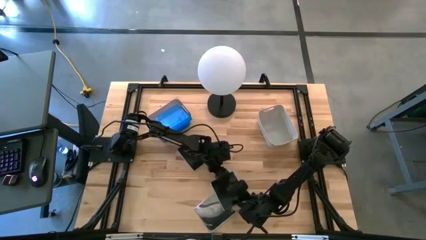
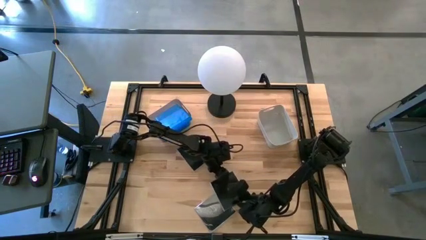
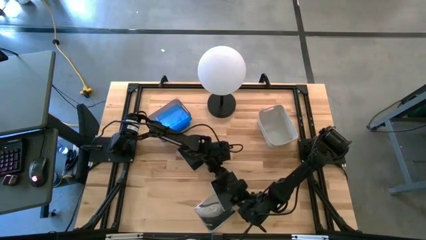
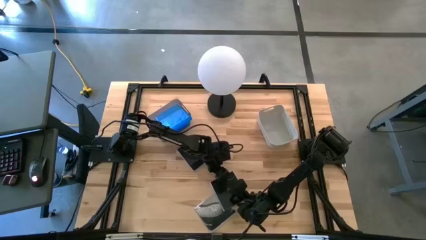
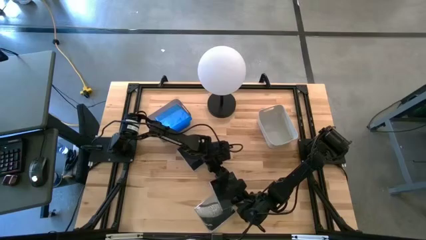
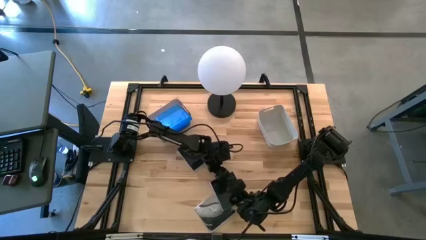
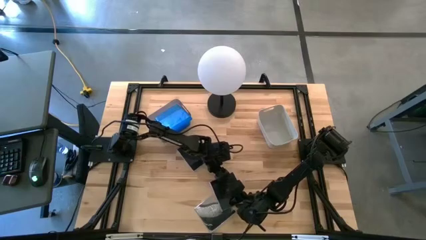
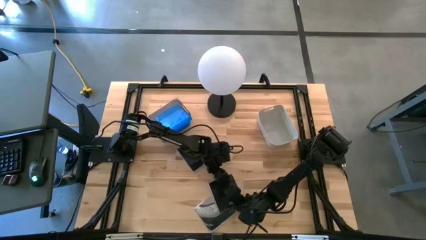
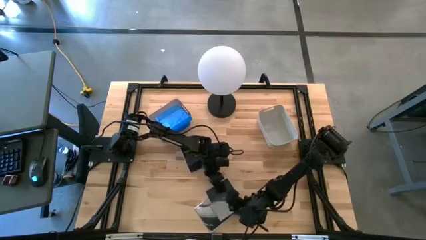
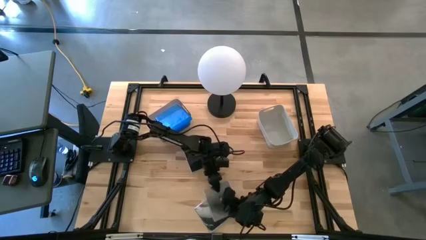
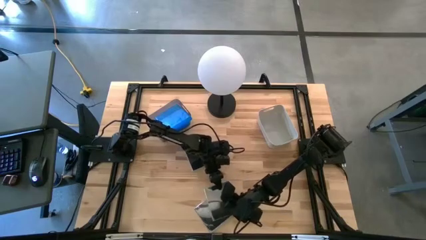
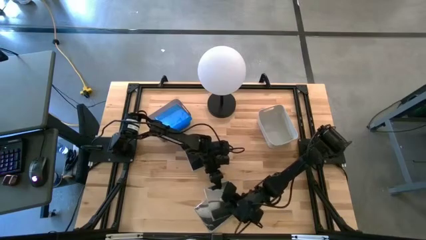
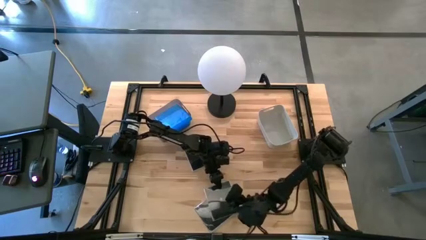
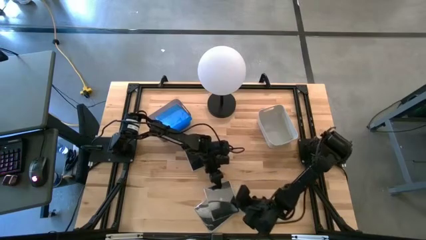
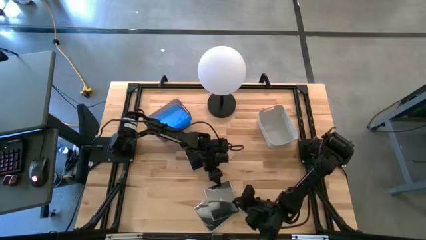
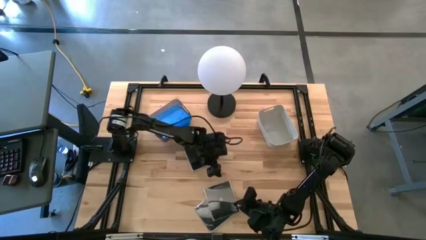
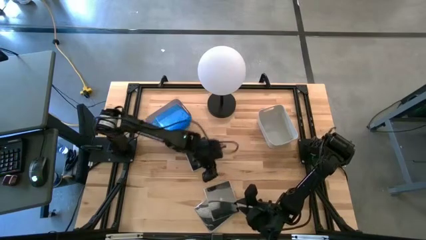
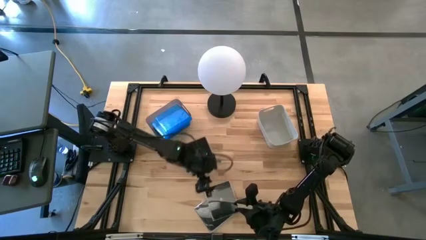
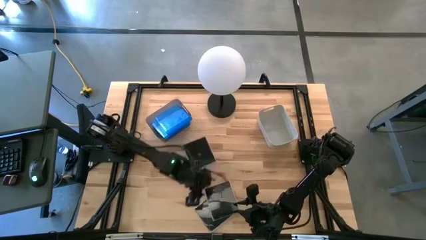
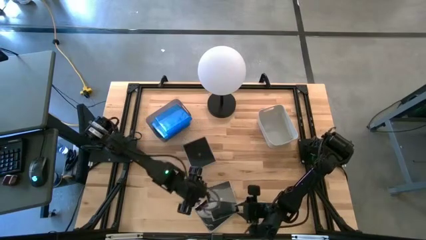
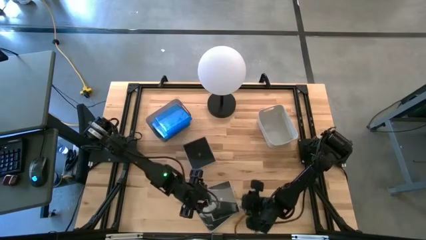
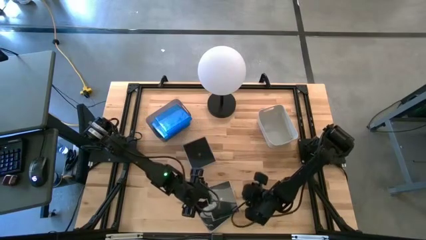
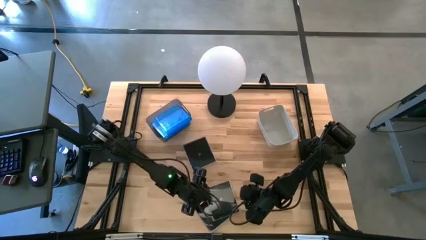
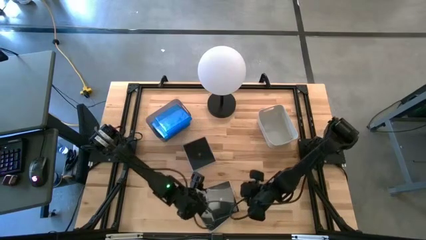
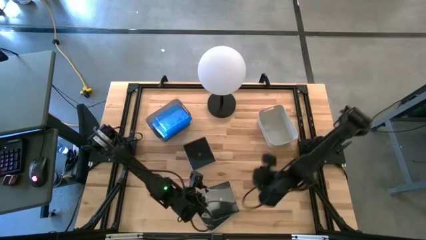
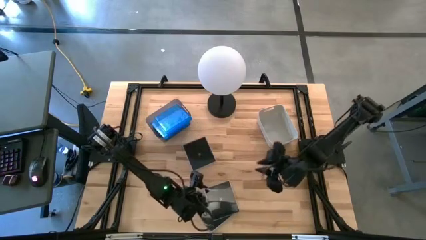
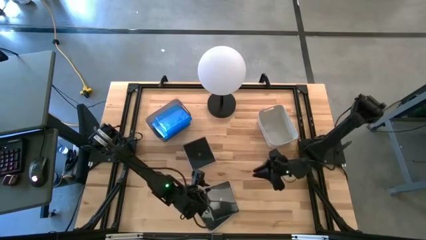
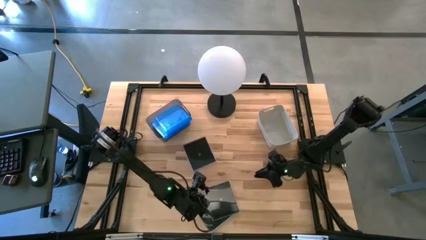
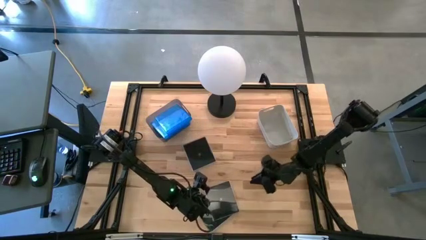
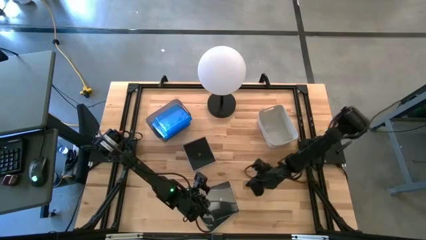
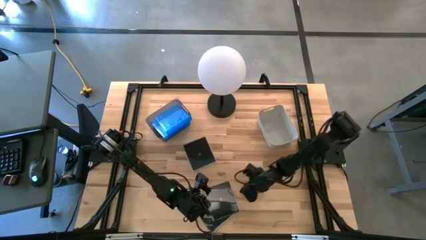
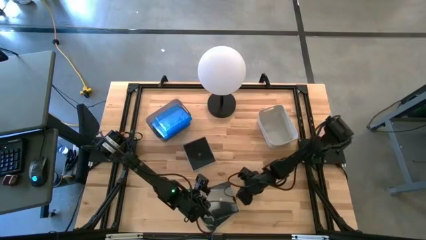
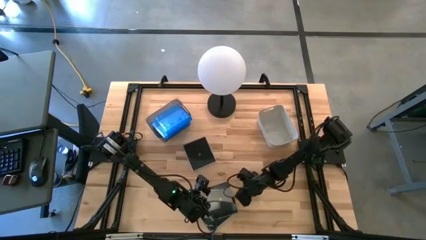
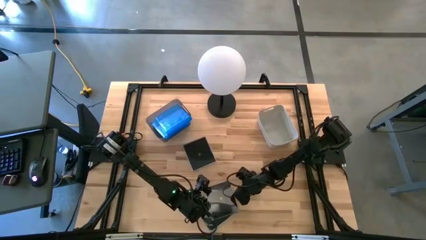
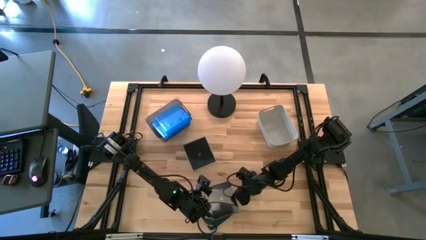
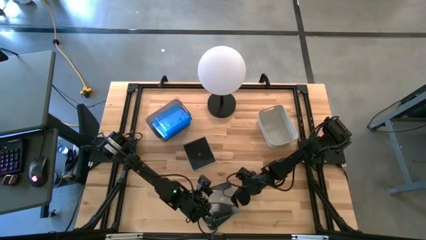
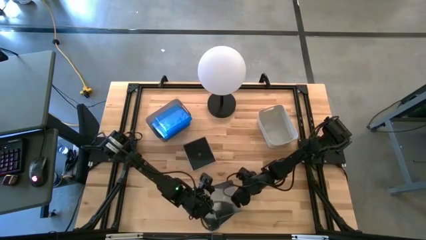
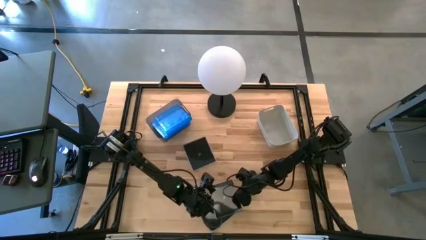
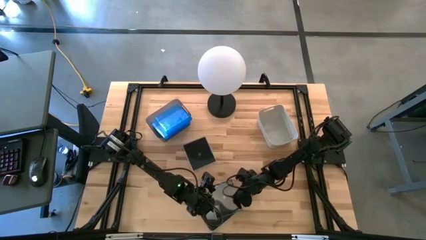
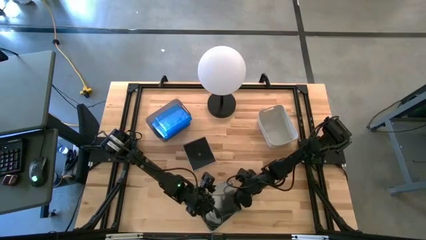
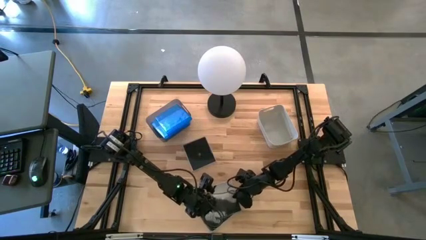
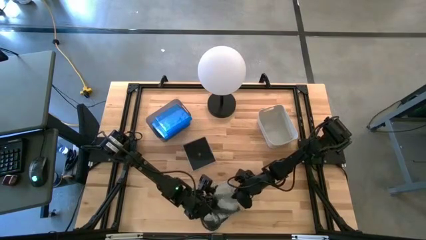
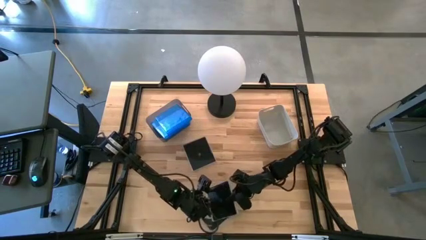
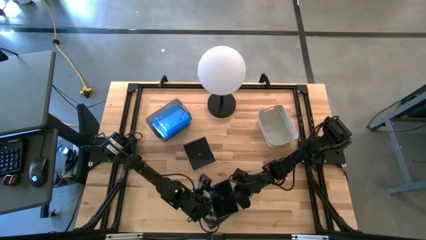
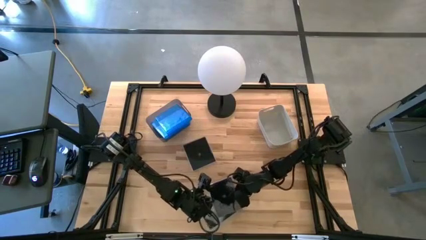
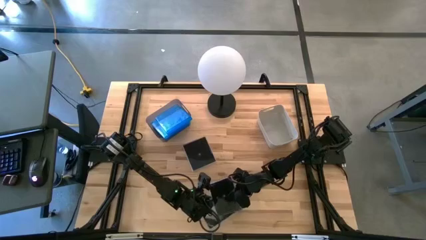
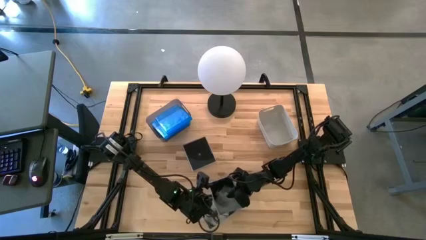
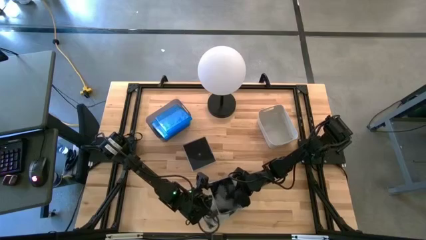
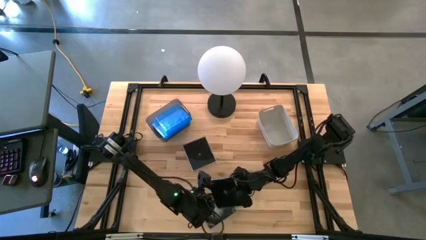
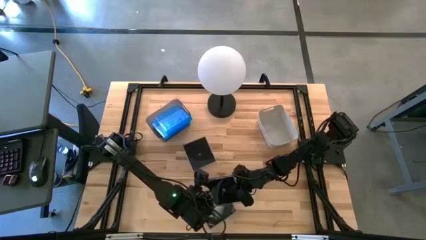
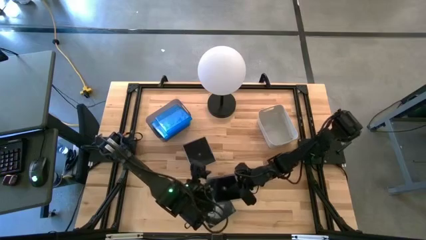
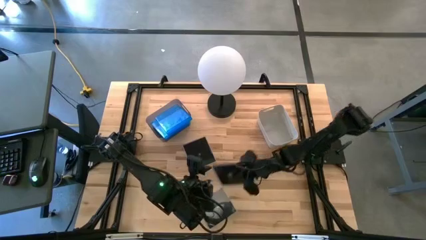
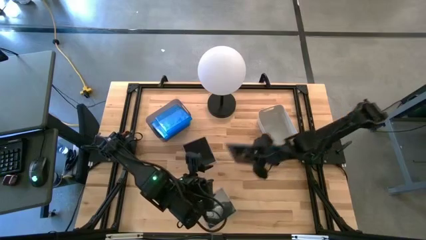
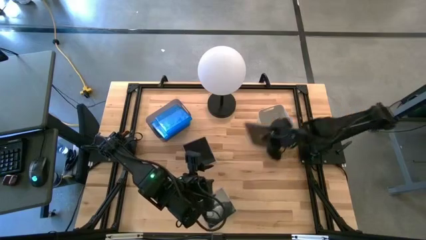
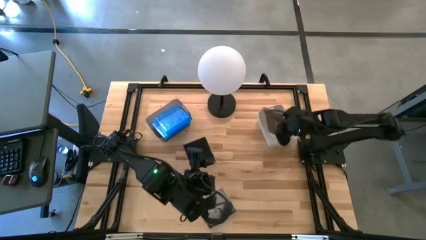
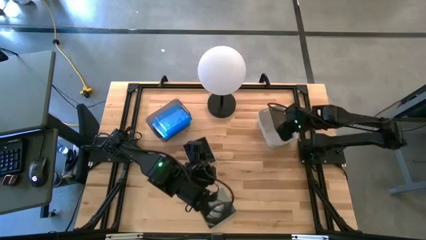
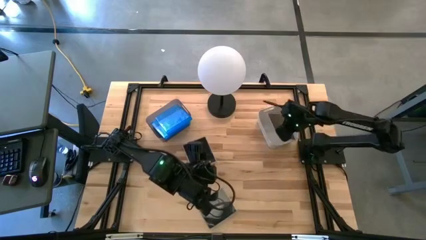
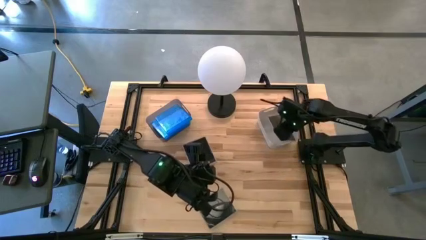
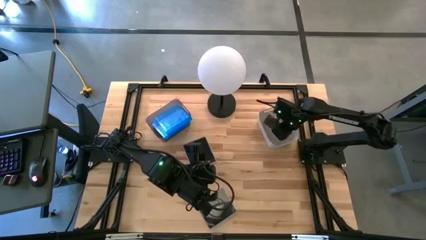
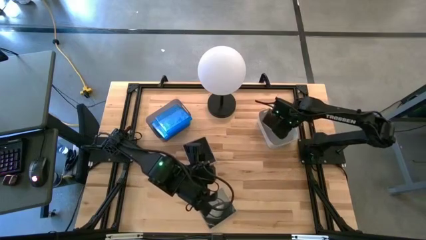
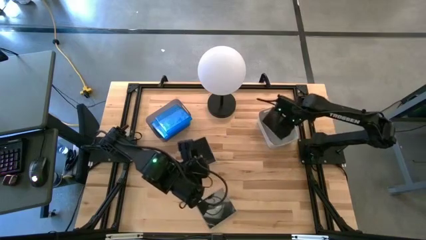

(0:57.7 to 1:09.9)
Task: Pick & place jewel cases by type
Put the top right black CD case into the gray bin

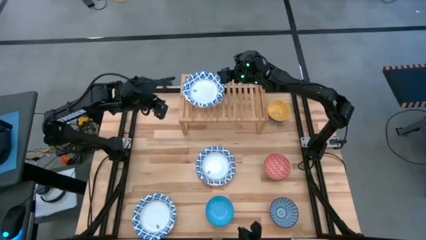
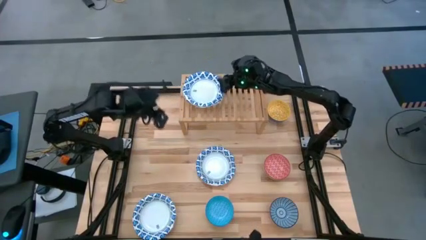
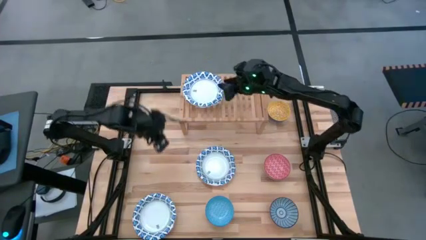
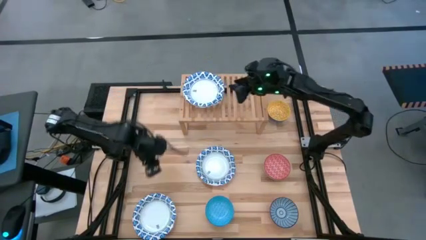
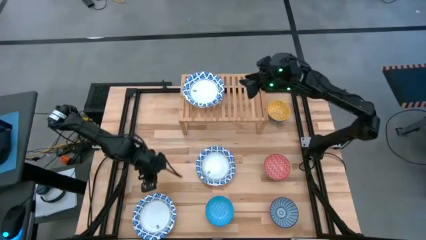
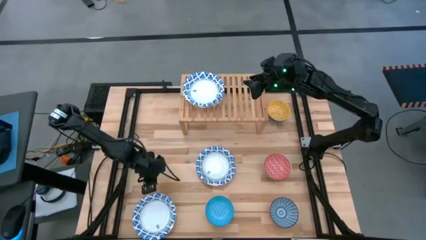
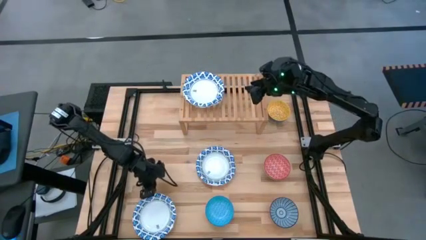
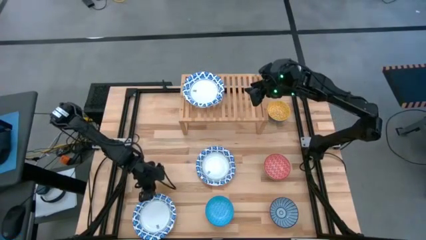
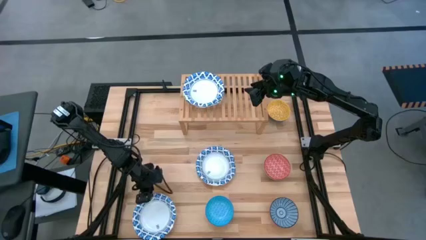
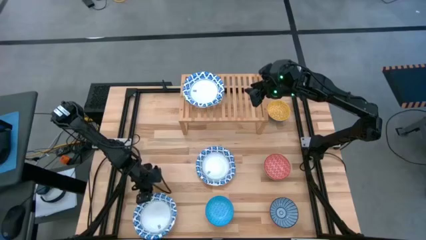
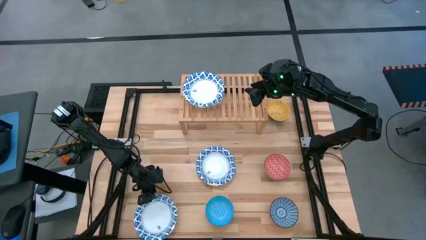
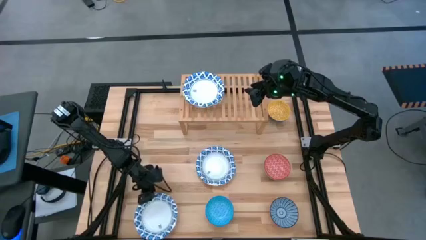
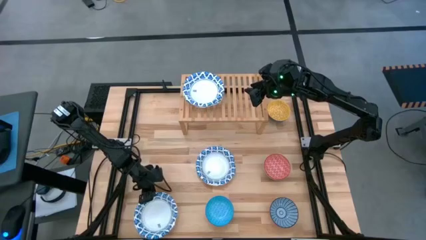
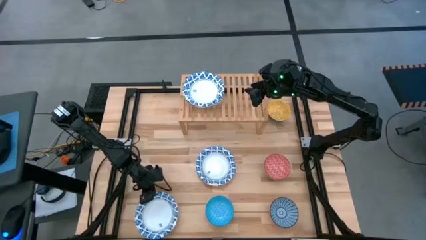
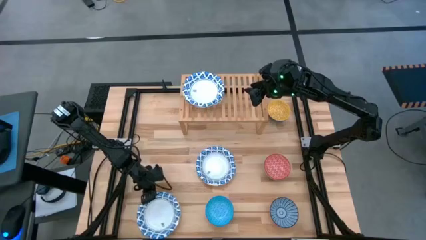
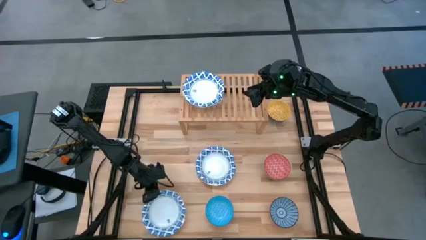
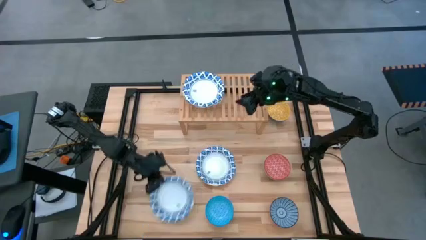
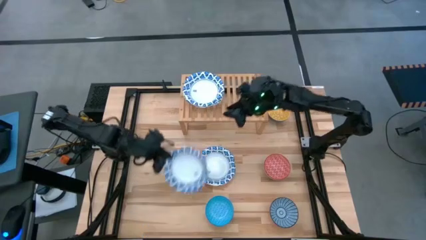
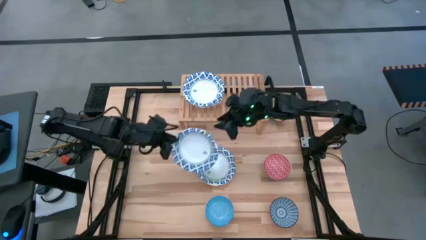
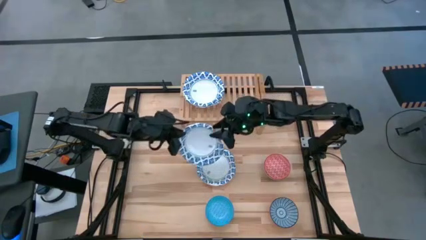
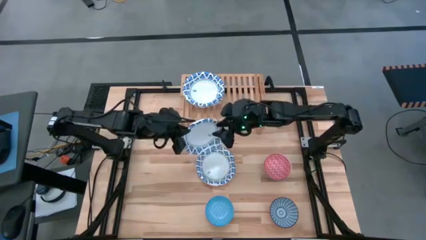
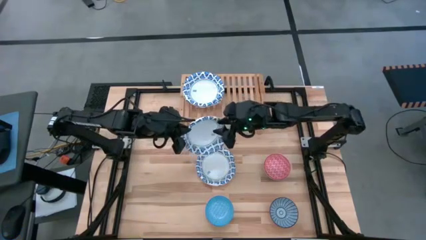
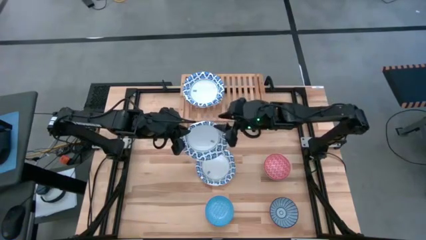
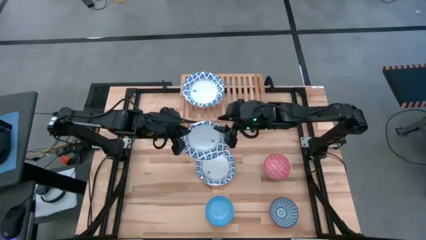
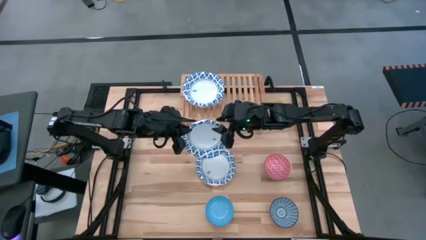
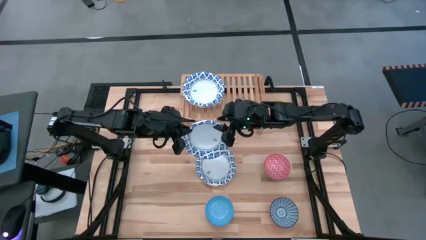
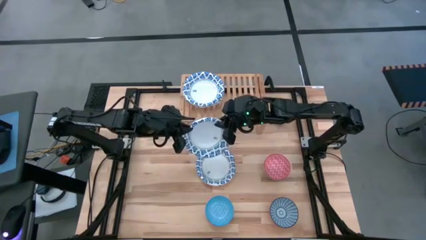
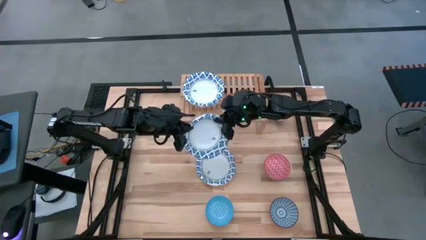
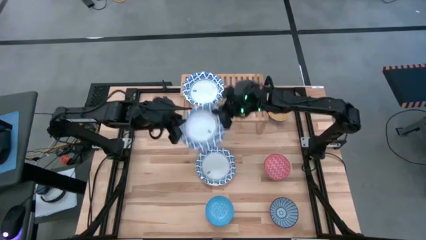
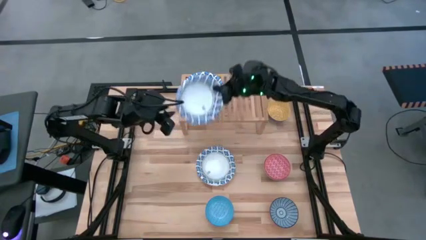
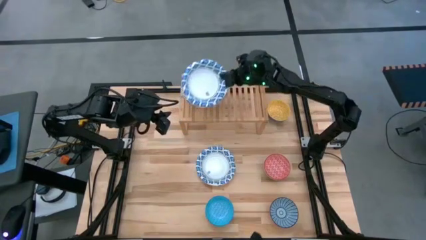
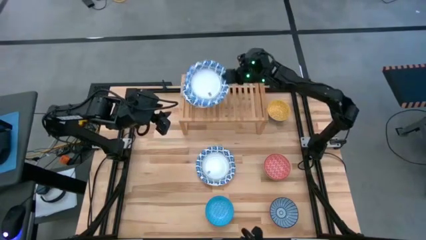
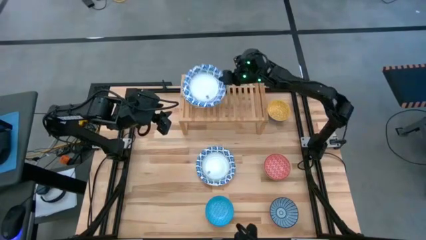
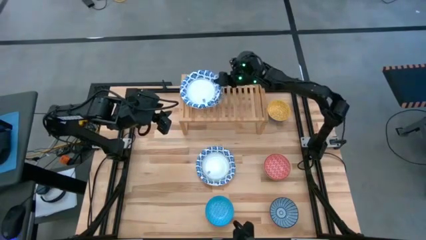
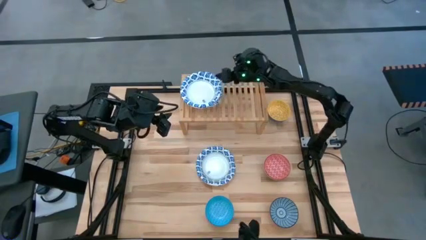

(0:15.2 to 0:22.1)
Task: Place and stack bowls onto a shelf
Stack the bottom white bowl on top of the other white bowl on the shelf
